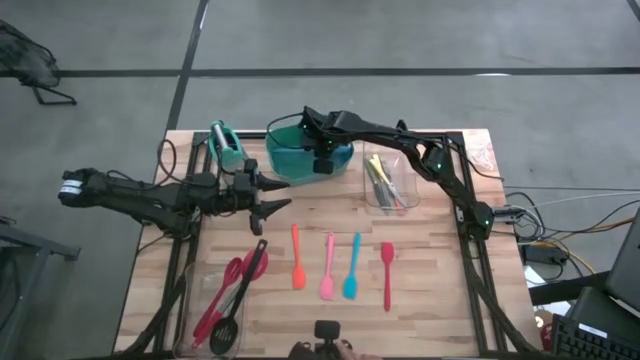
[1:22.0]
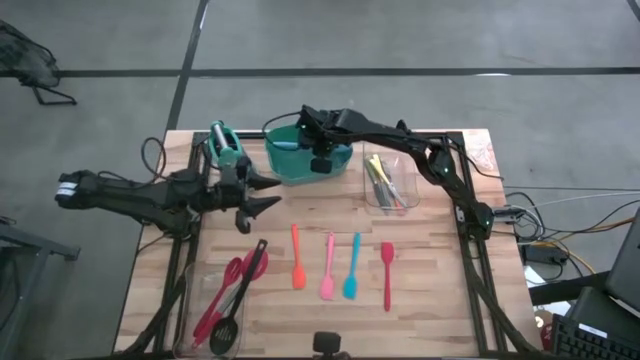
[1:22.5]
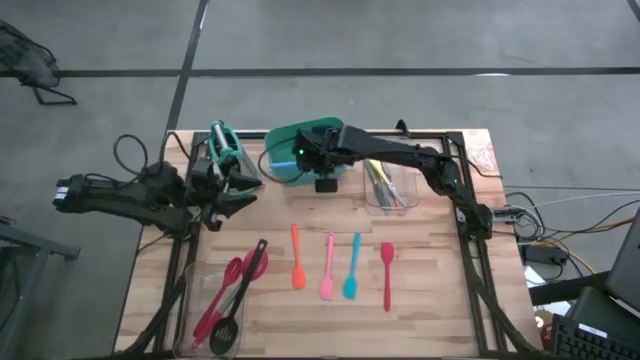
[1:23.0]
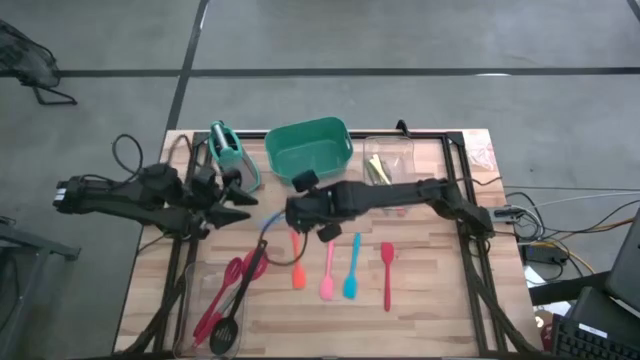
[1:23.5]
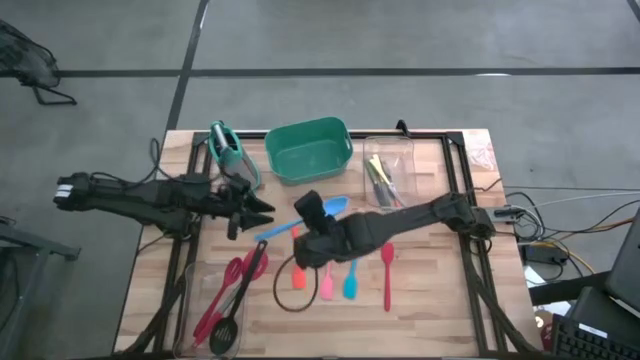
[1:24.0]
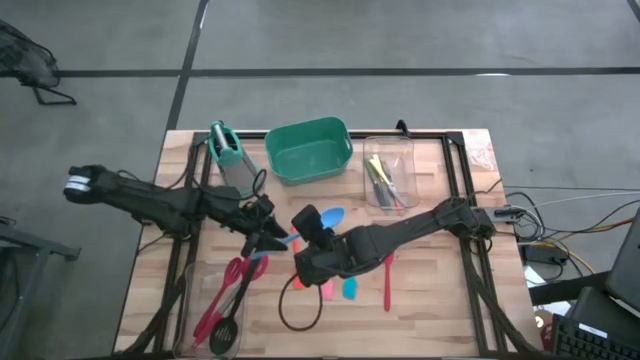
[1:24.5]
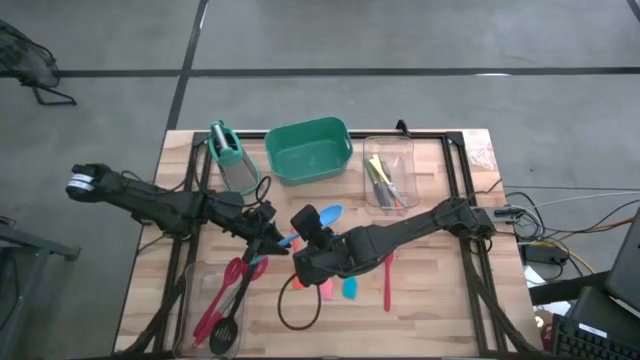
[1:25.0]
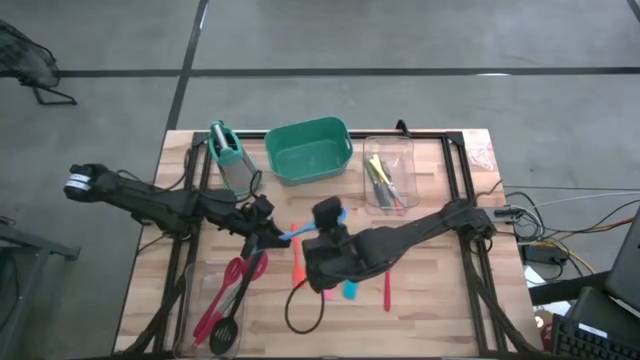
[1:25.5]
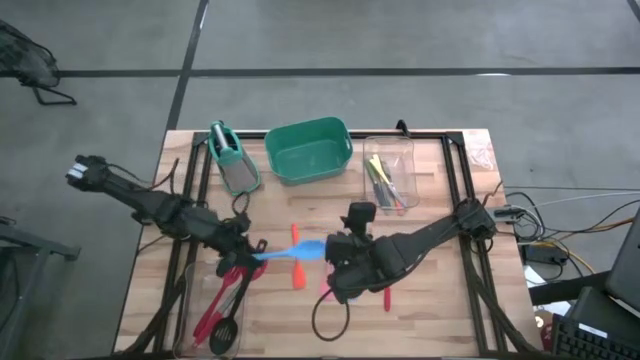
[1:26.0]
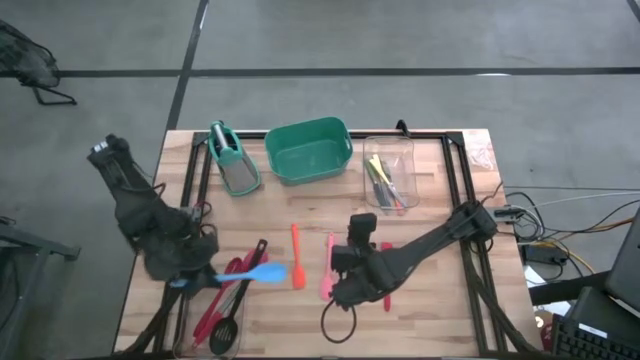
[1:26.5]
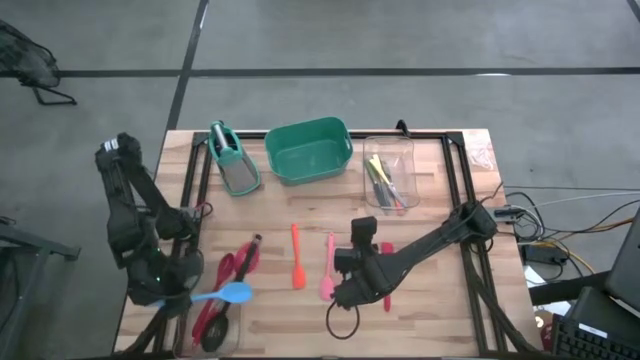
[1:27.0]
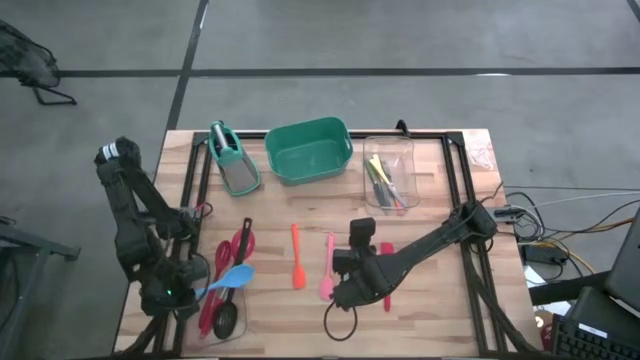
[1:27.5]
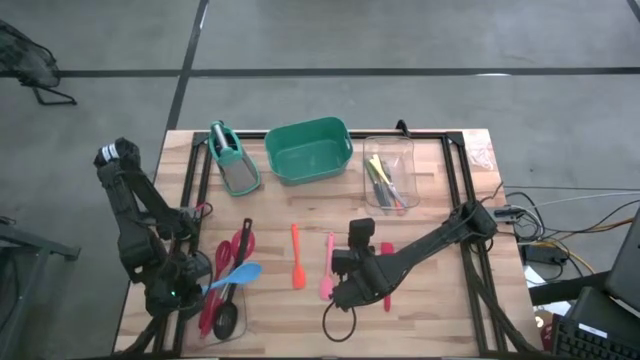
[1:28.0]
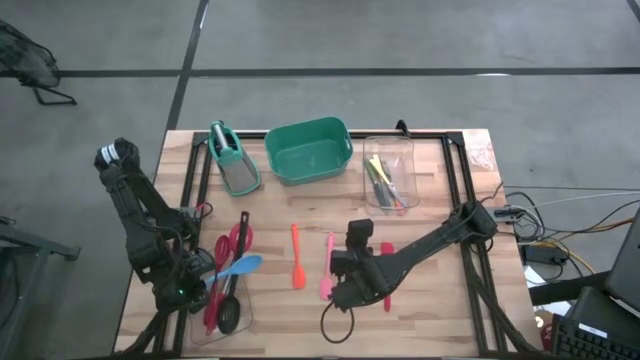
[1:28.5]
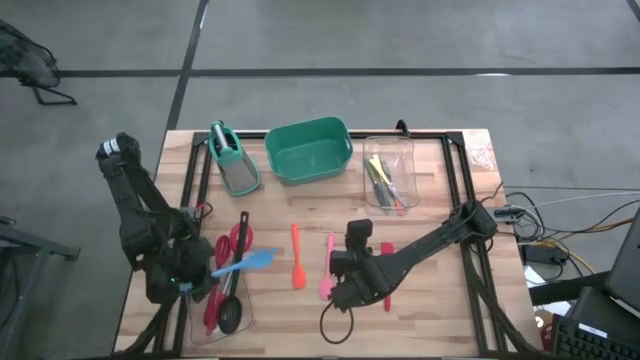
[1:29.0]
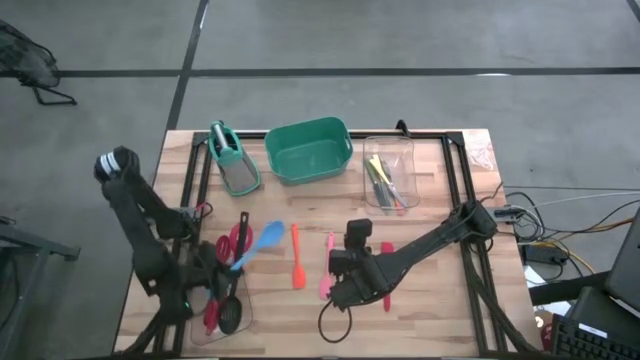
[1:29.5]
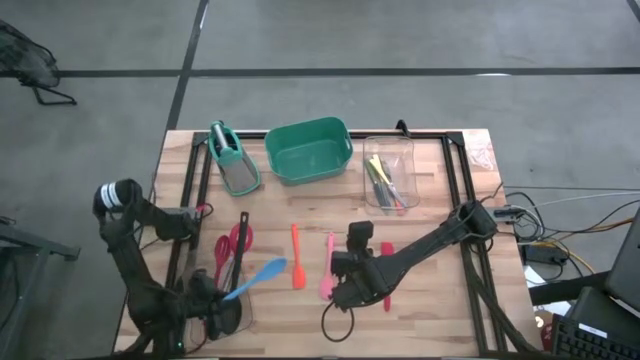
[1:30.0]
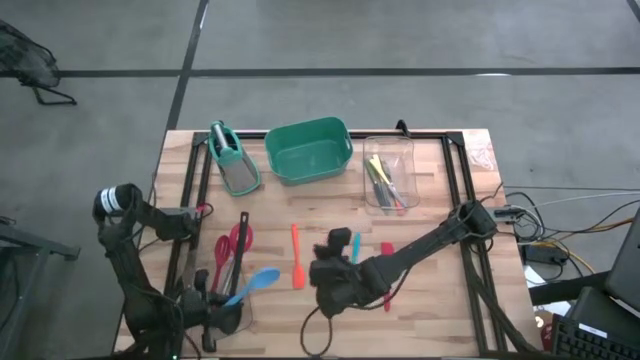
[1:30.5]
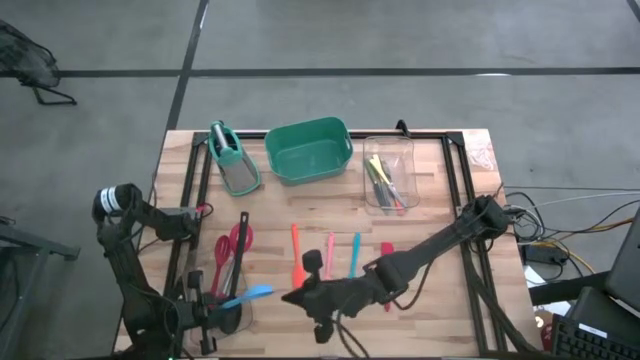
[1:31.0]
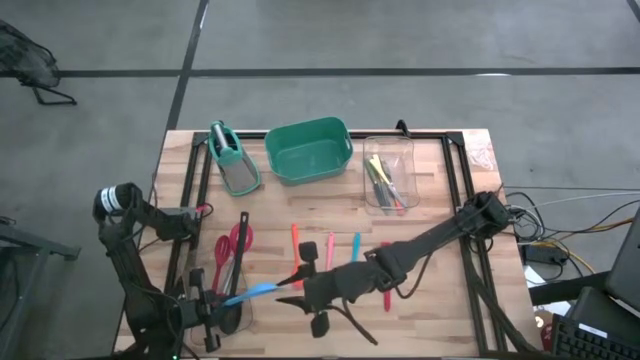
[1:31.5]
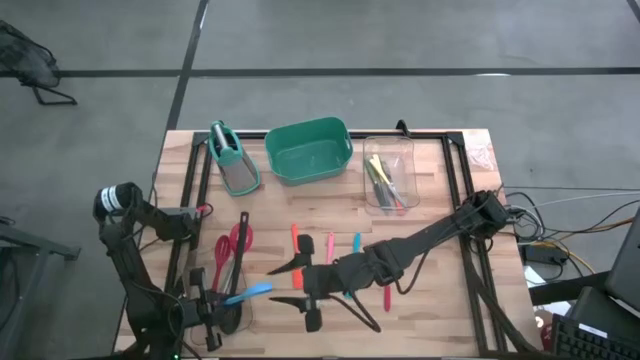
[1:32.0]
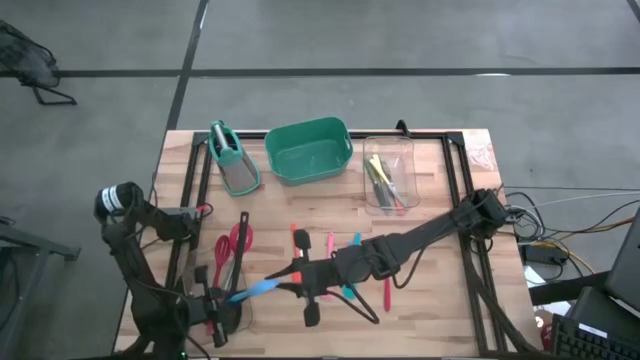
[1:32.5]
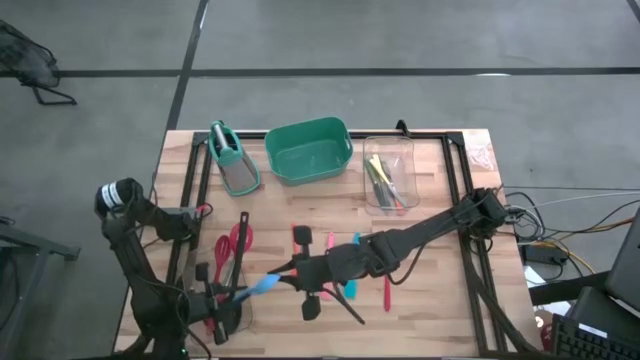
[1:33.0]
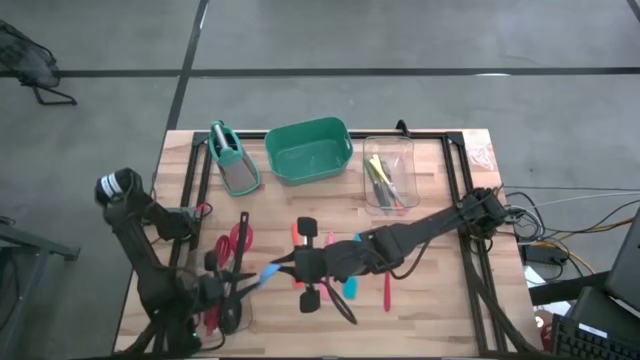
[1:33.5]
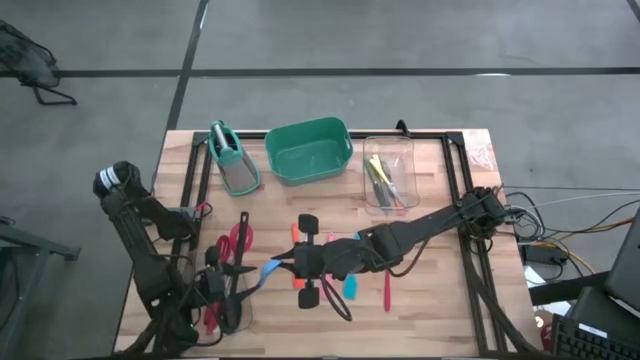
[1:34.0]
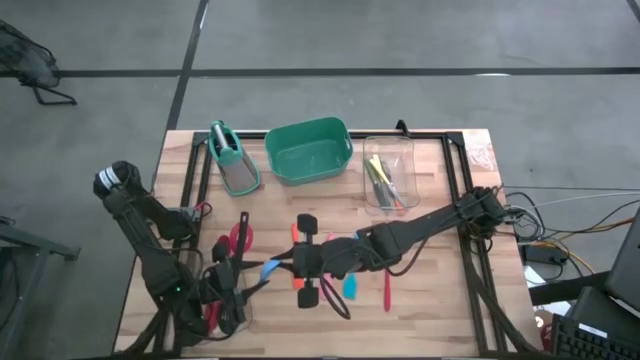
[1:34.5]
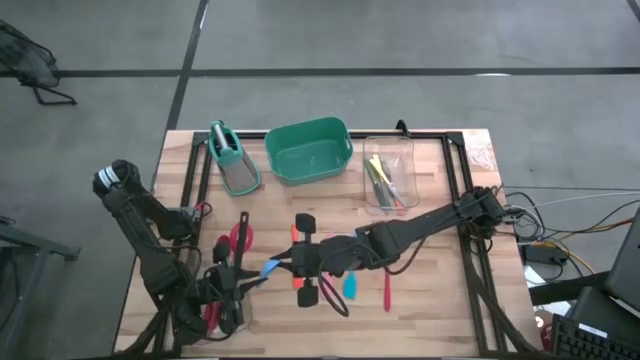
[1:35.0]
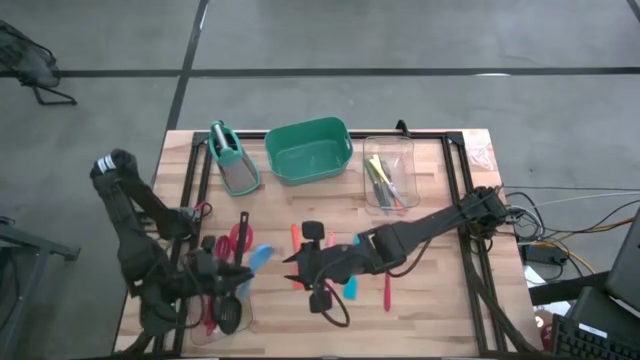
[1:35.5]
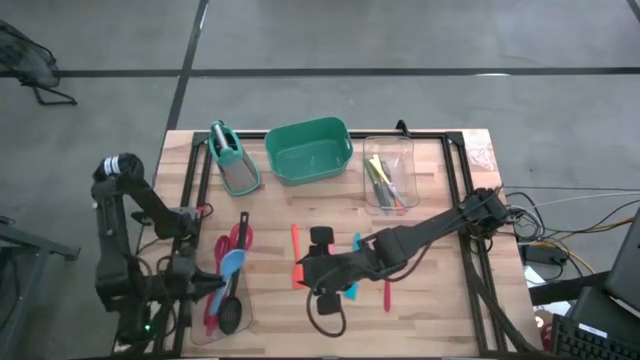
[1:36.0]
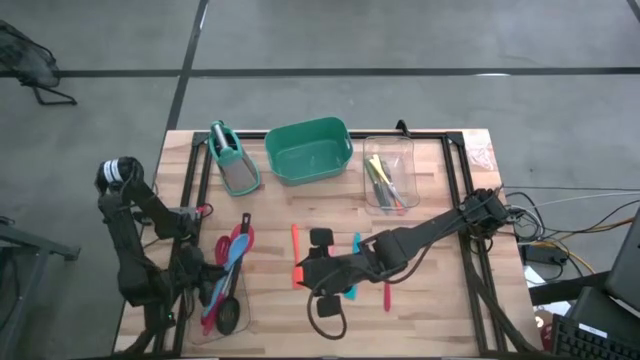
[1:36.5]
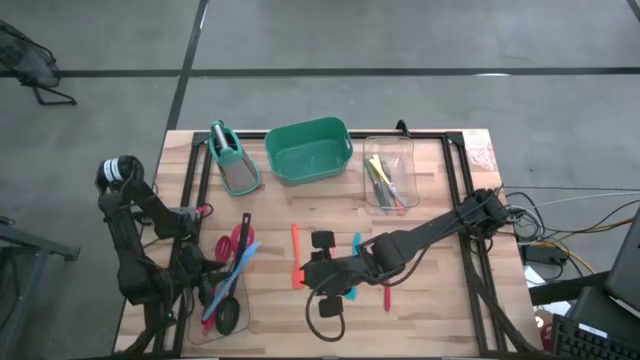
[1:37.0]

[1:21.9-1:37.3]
Task: Pick & Place Kitchen Items
Put the blue serving spoon into the bottom transparent bin

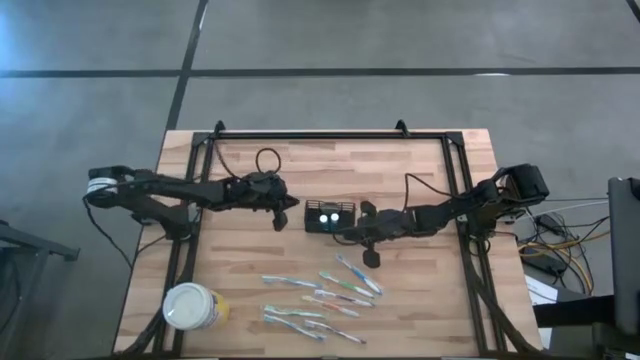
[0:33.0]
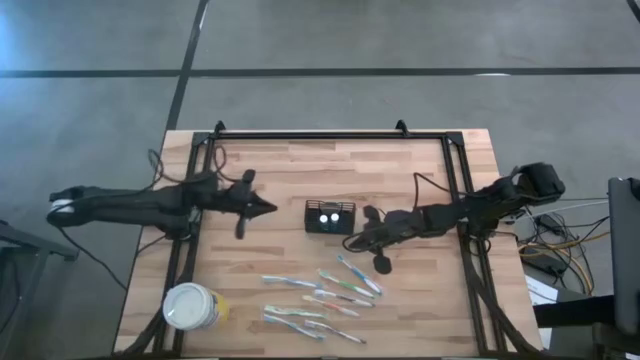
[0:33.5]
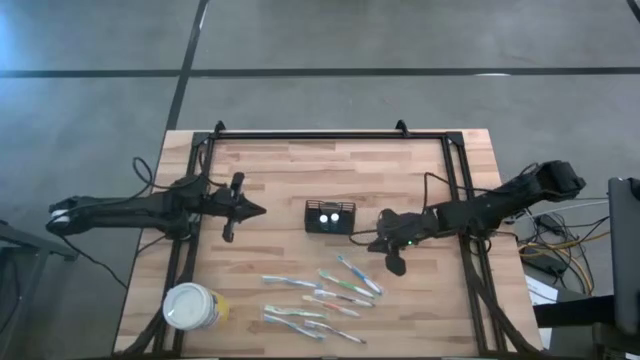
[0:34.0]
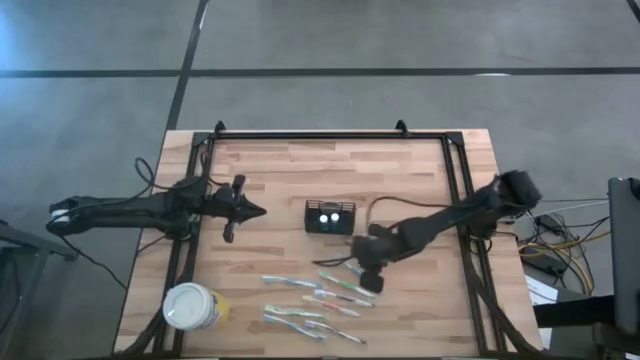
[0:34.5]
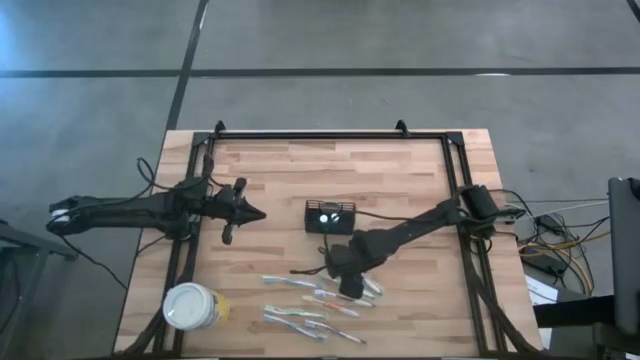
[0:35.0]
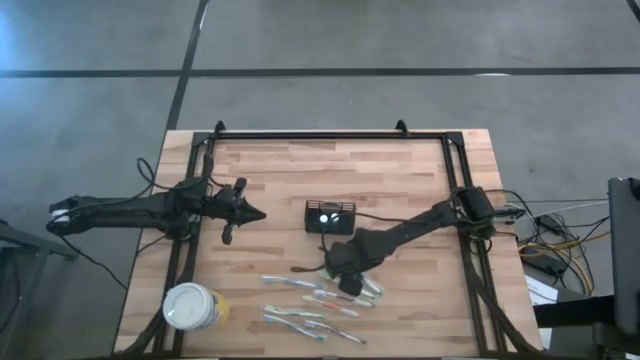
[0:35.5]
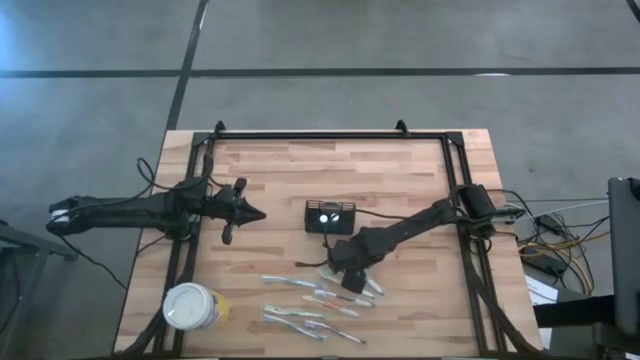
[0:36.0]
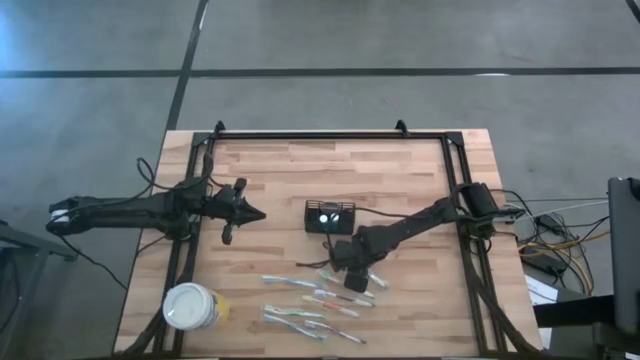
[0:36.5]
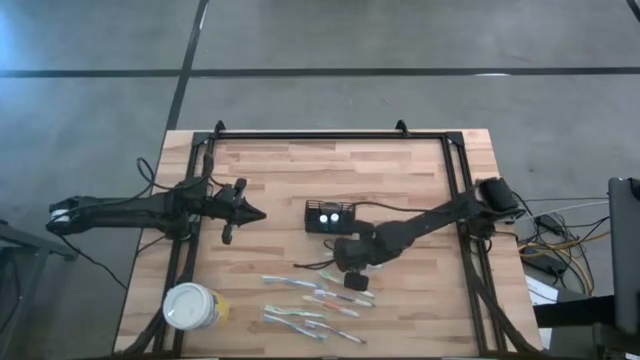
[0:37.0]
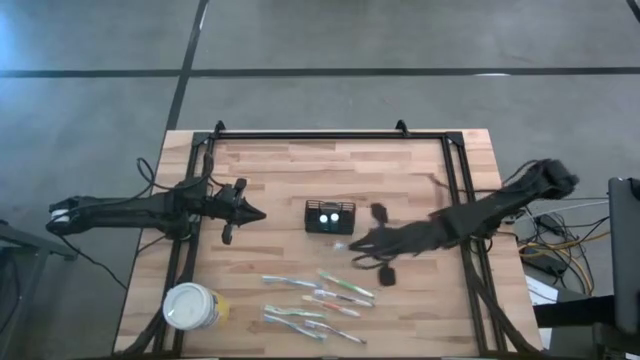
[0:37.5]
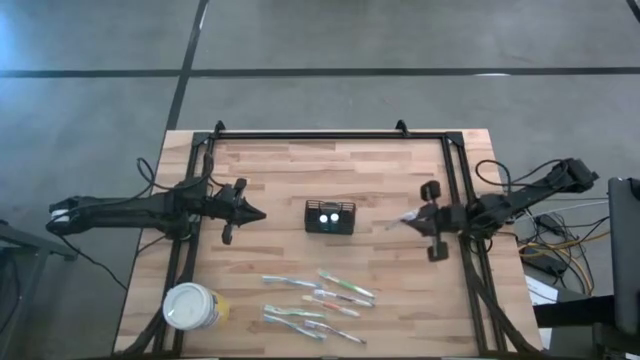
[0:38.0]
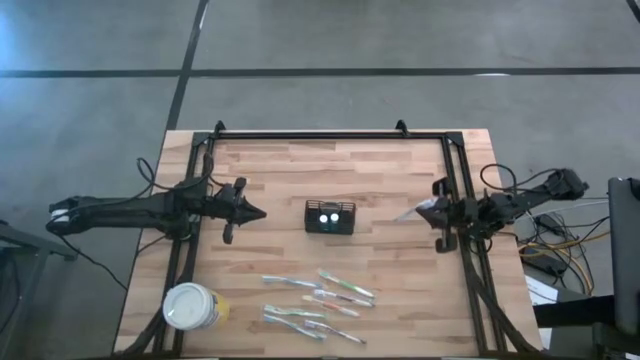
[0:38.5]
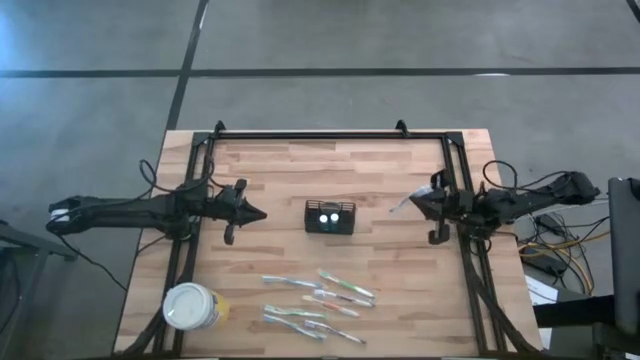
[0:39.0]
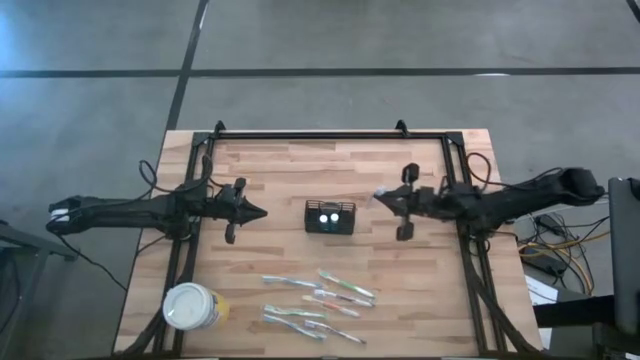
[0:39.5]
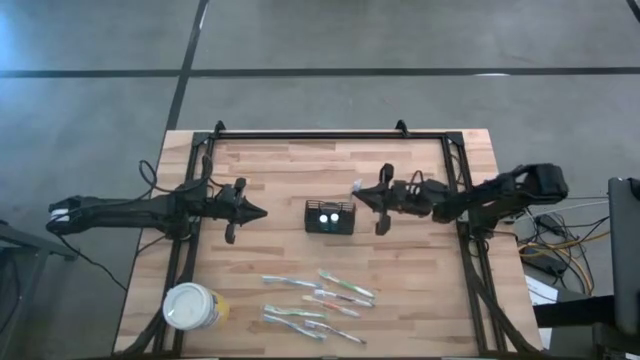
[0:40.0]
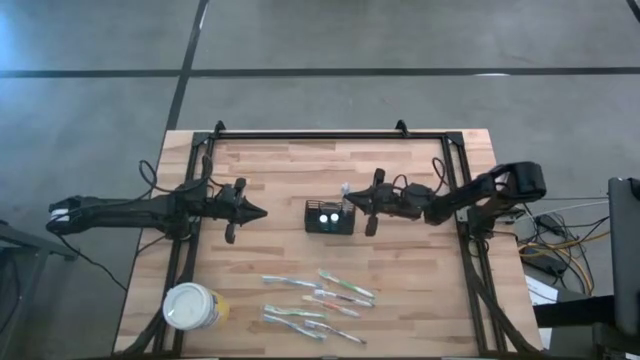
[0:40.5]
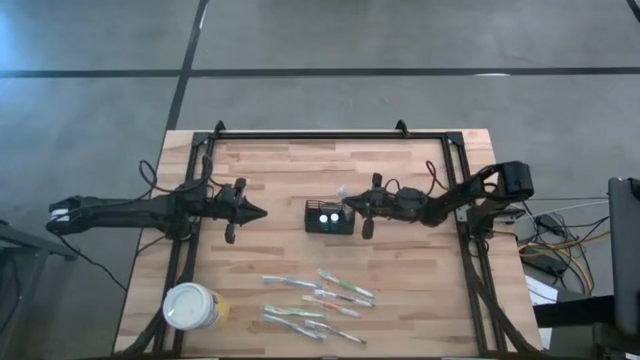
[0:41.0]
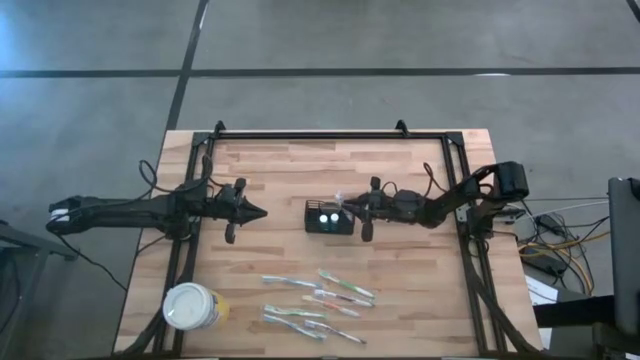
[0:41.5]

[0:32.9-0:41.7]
Task: Pick & Place toothbrushing station
Put the top blue toothbrush into the wire organizer
